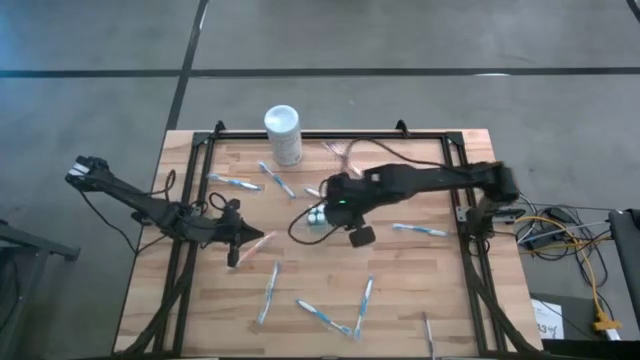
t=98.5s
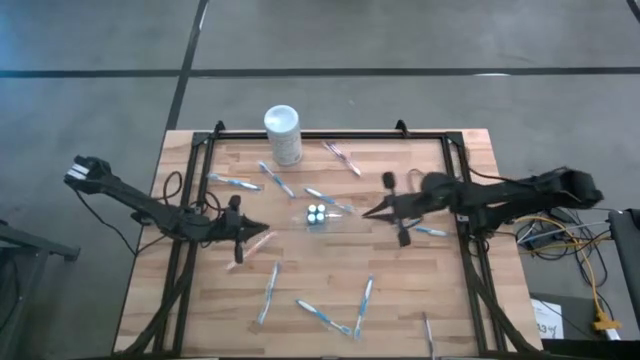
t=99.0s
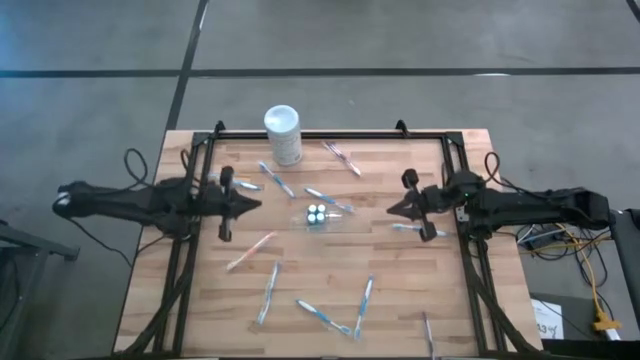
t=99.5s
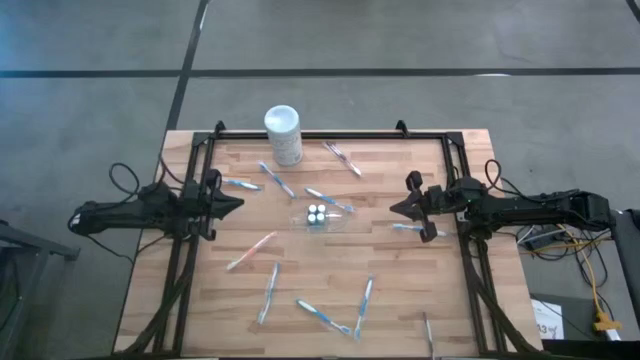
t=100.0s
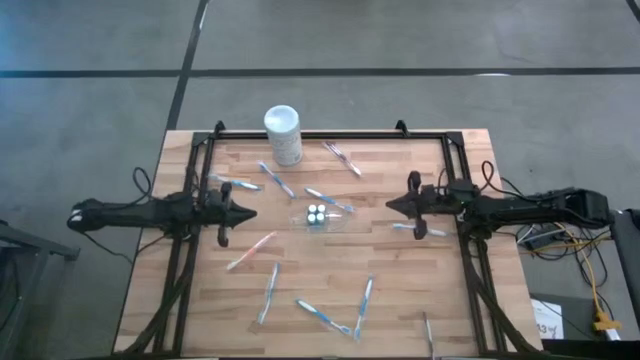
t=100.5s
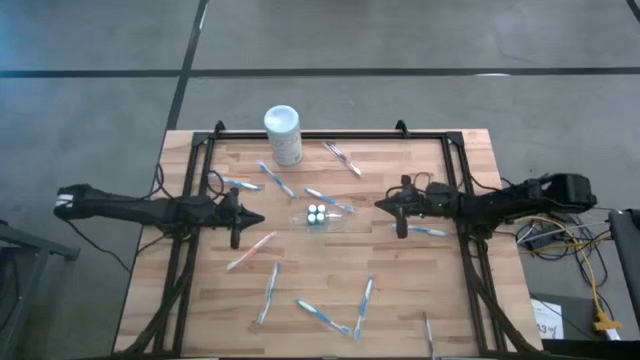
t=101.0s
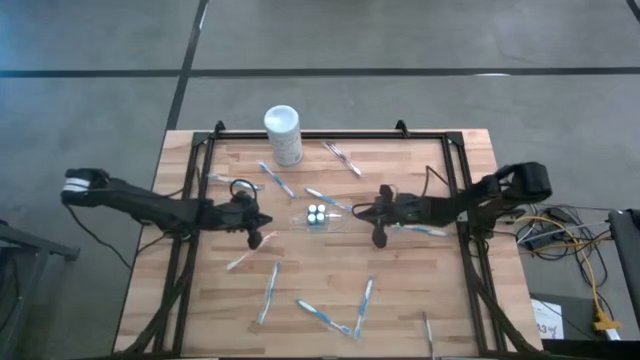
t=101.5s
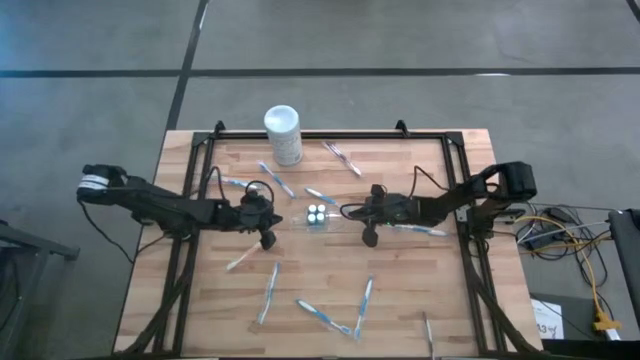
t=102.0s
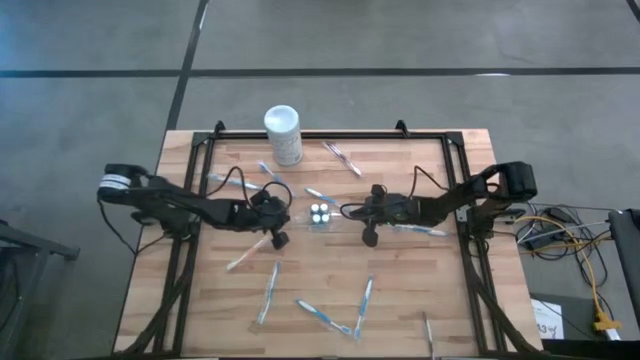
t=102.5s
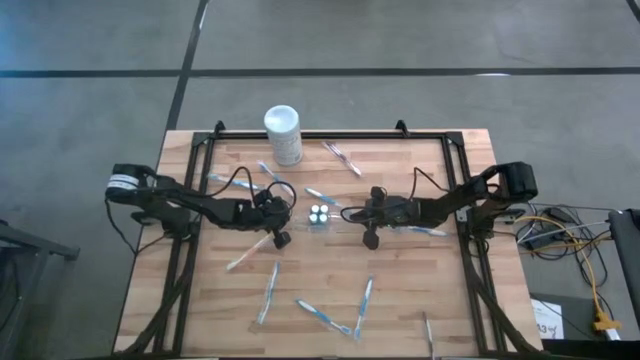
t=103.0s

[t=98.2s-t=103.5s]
Task: Pick & Place toothbrushing station
Adjust the transparent organizer

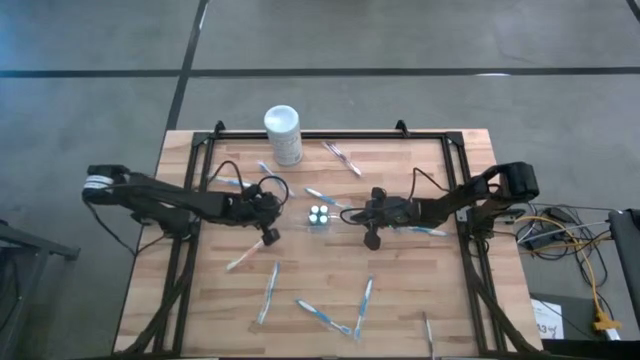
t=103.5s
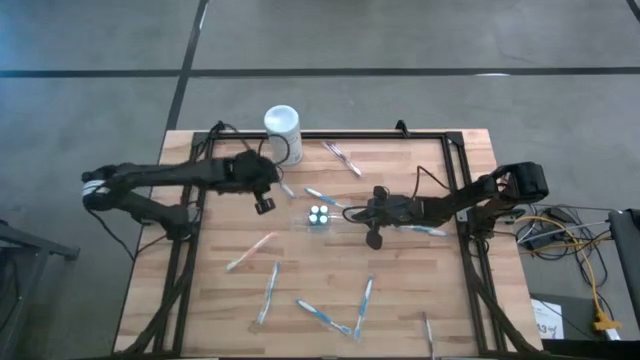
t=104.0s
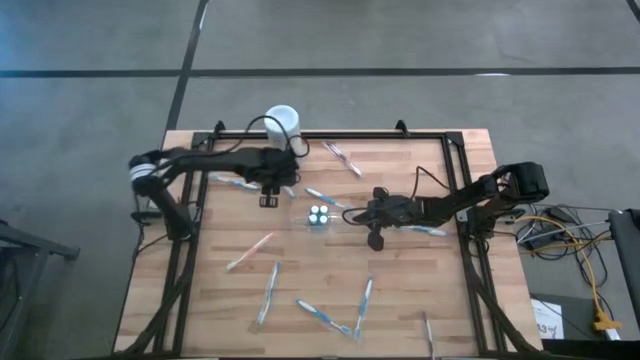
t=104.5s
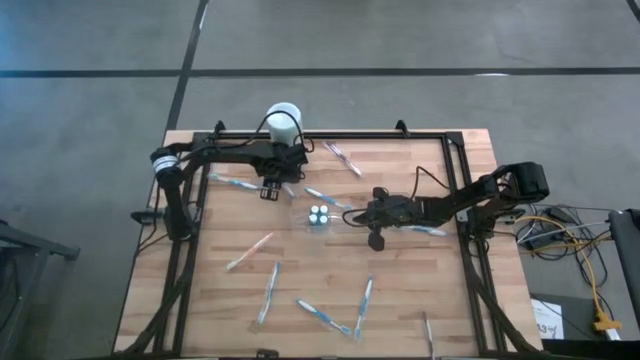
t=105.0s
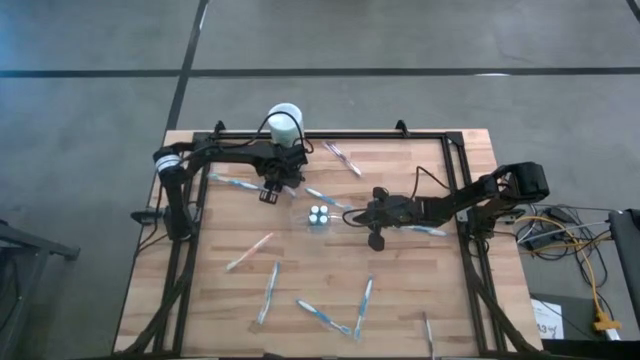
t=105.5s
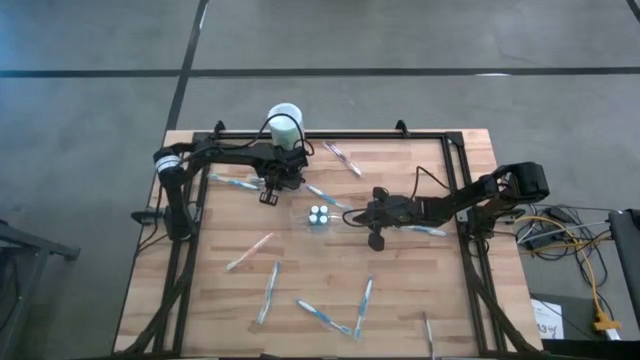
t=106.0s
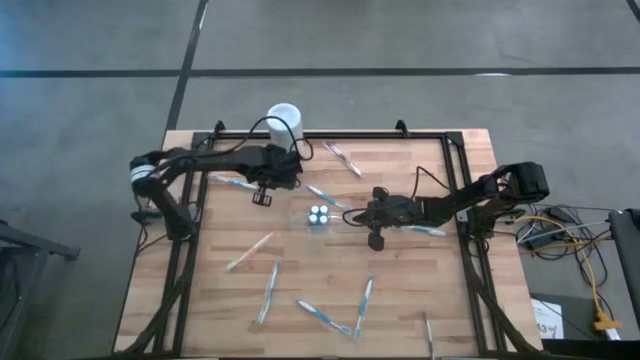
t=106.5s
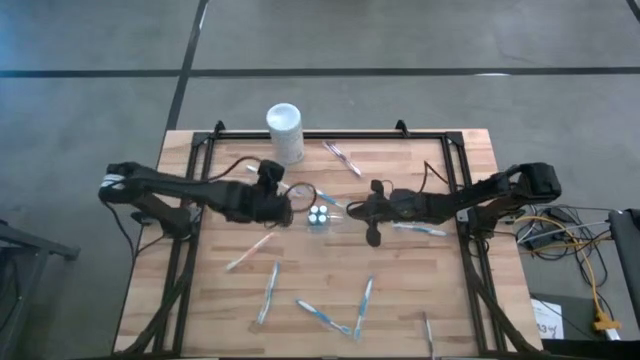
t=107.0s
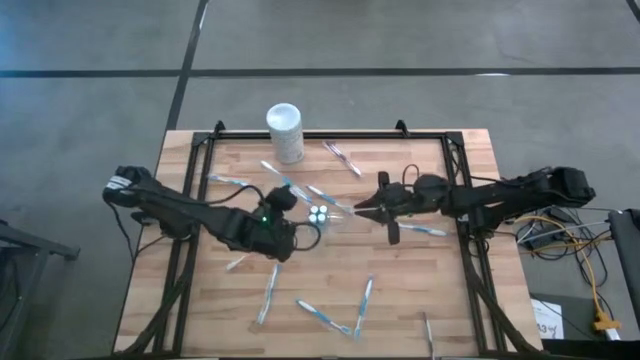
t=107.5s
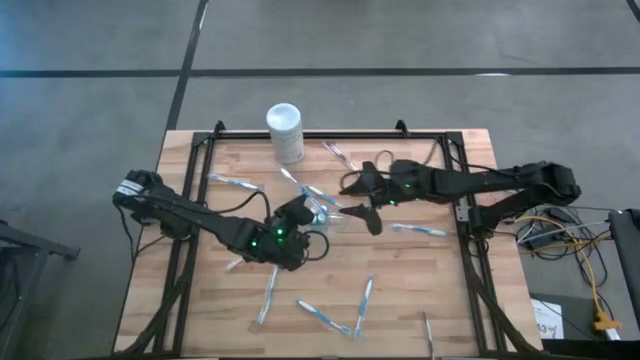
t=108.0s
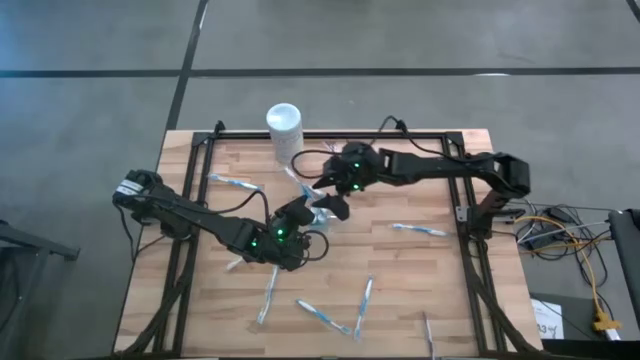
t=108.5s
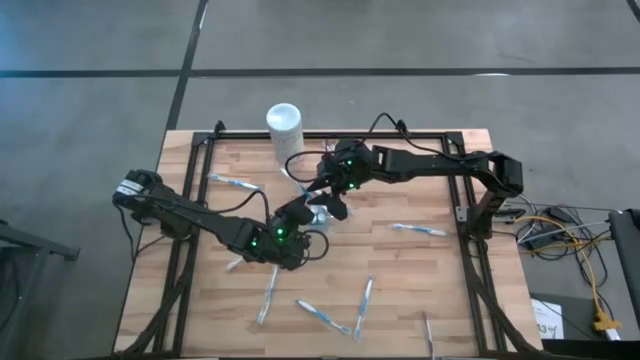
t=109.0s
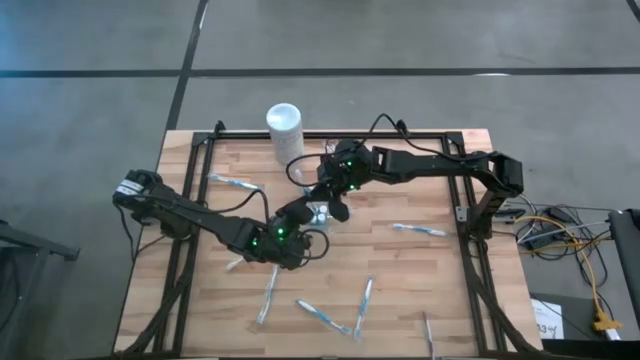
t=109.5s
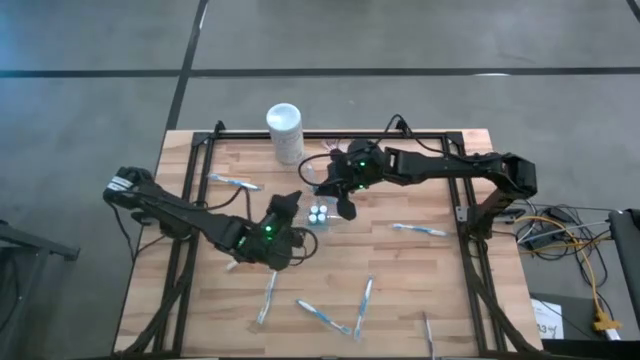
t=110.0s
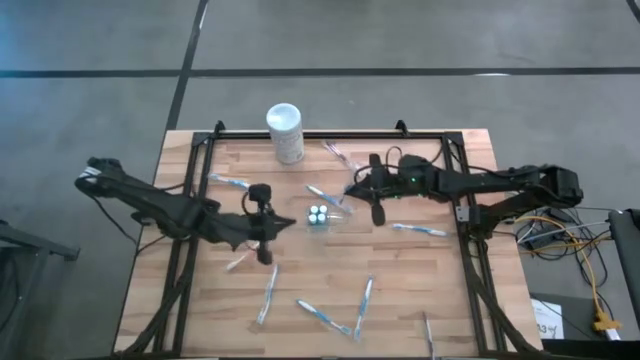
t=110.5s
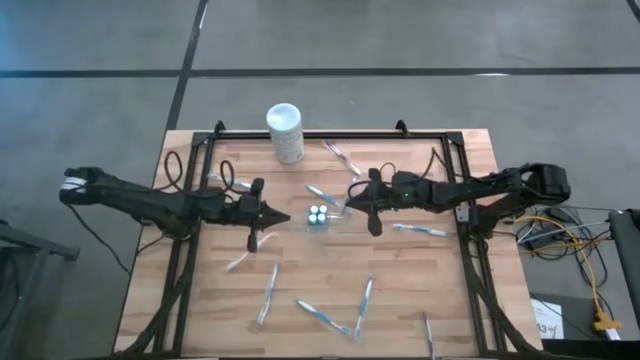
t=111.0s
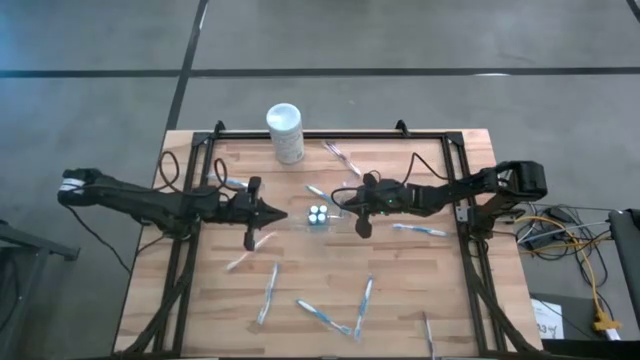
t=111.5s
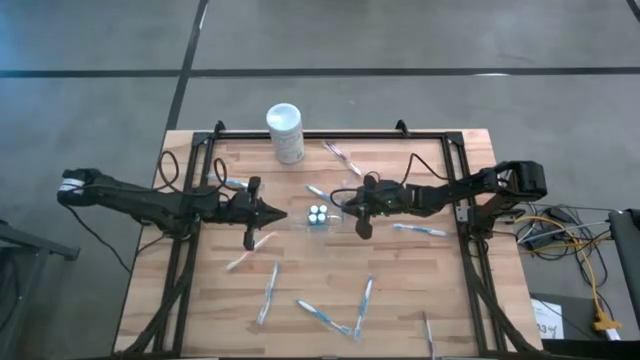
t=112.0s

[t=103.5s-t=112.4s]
Put the blue toothbrush into the transparent organizer

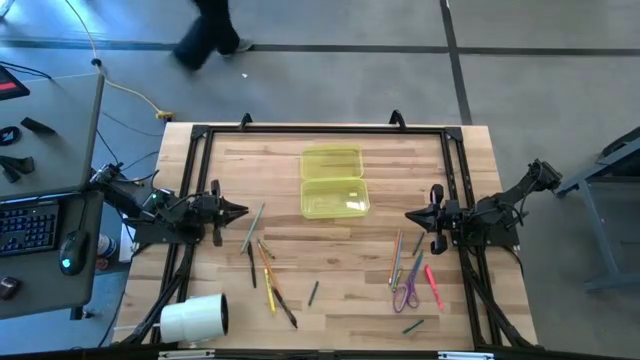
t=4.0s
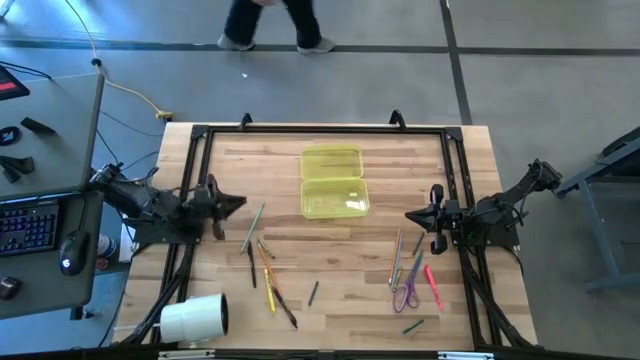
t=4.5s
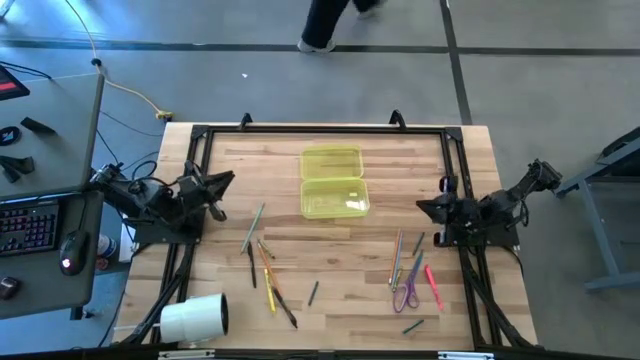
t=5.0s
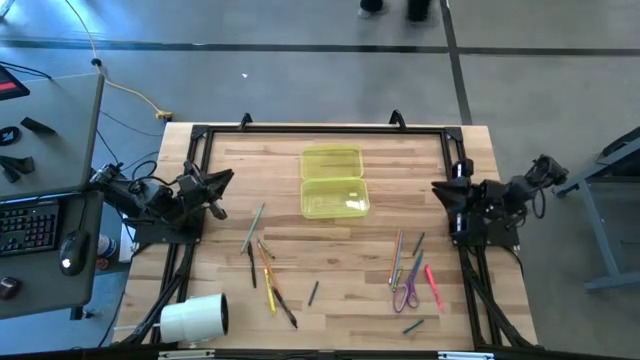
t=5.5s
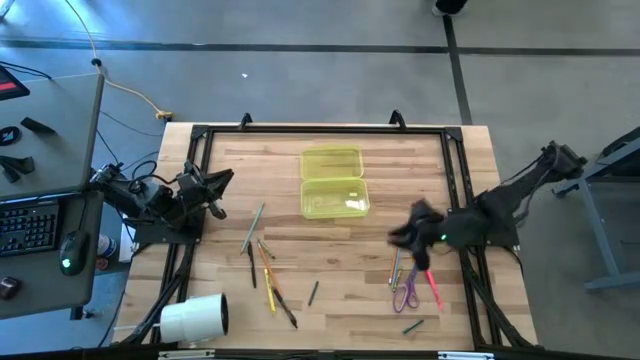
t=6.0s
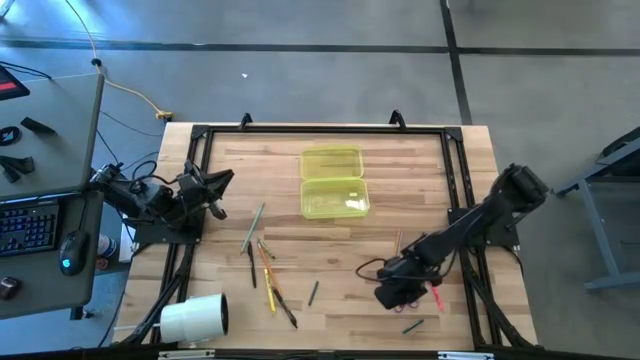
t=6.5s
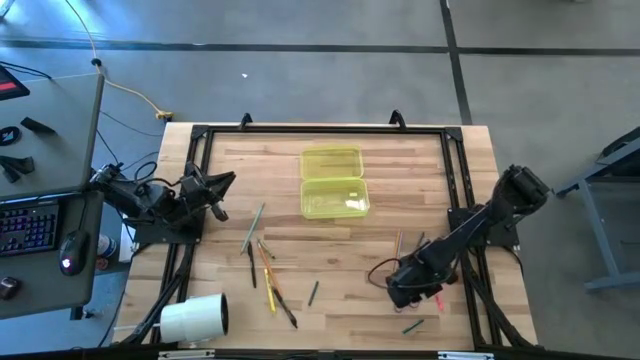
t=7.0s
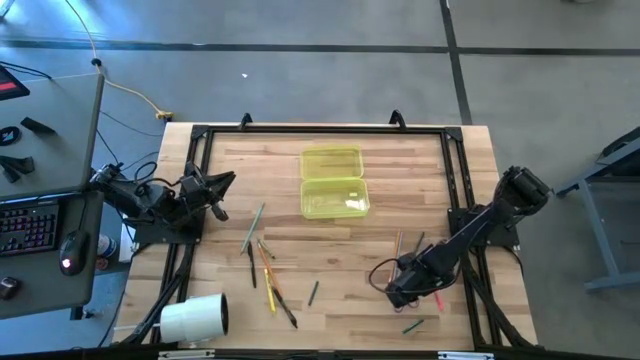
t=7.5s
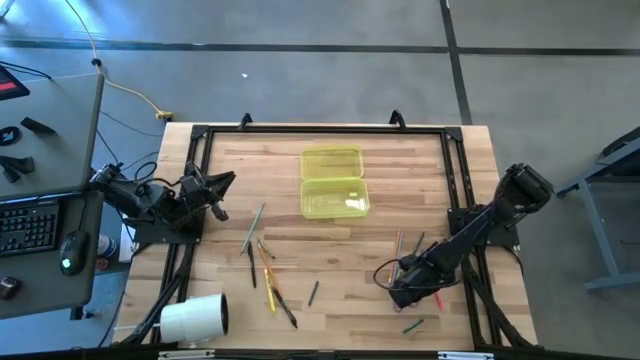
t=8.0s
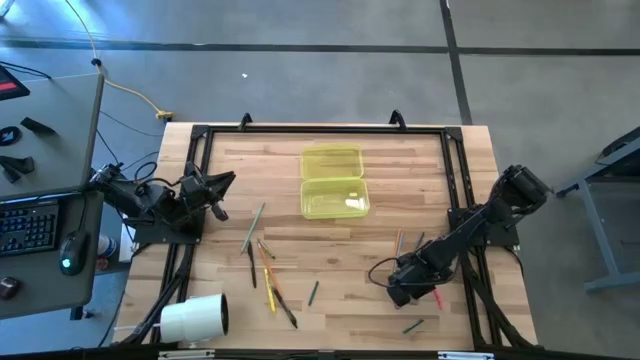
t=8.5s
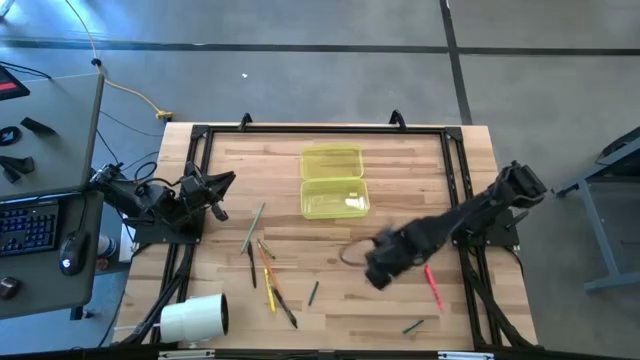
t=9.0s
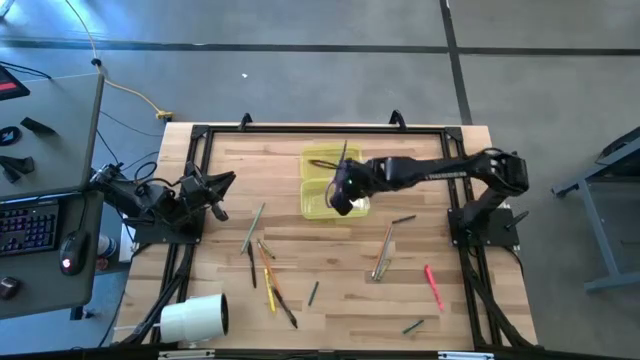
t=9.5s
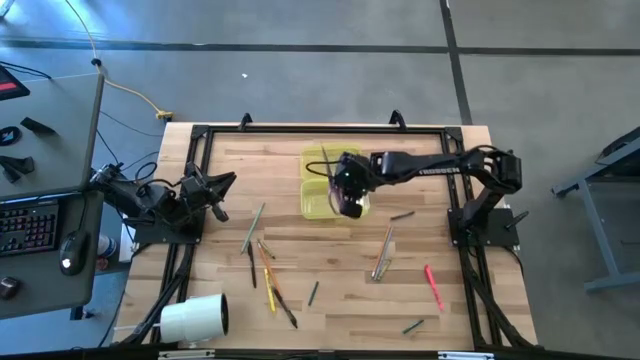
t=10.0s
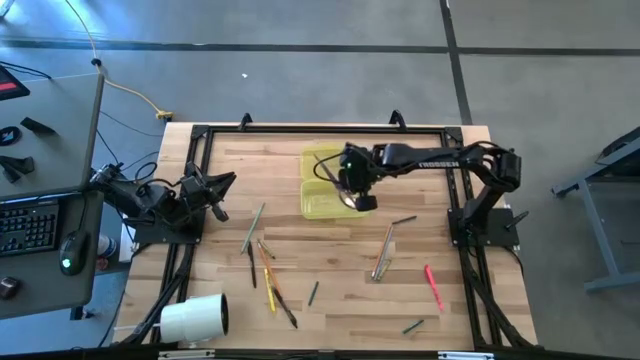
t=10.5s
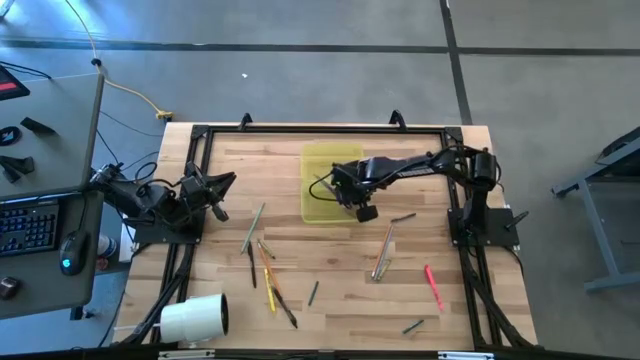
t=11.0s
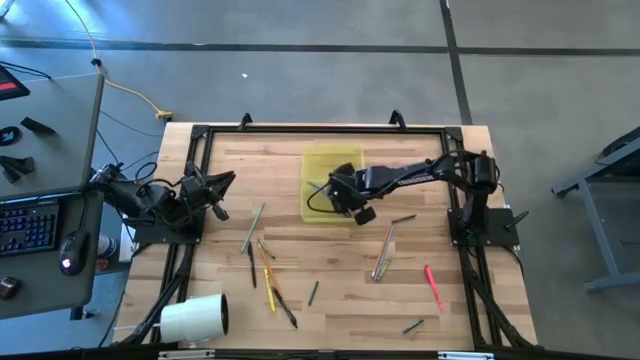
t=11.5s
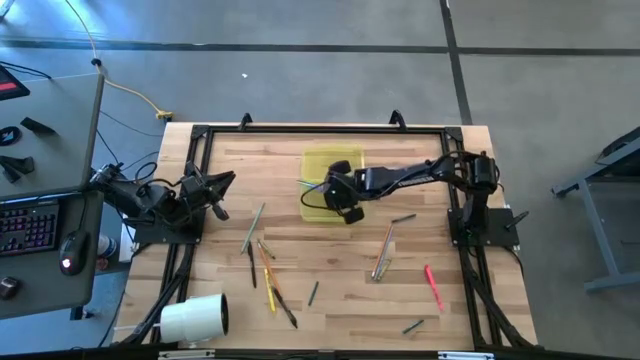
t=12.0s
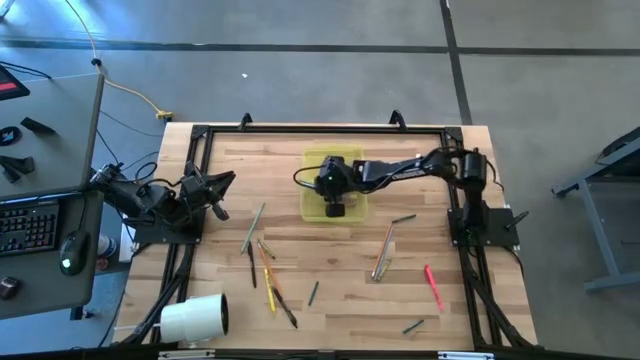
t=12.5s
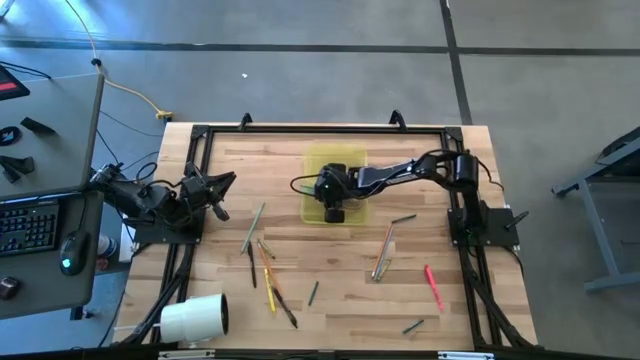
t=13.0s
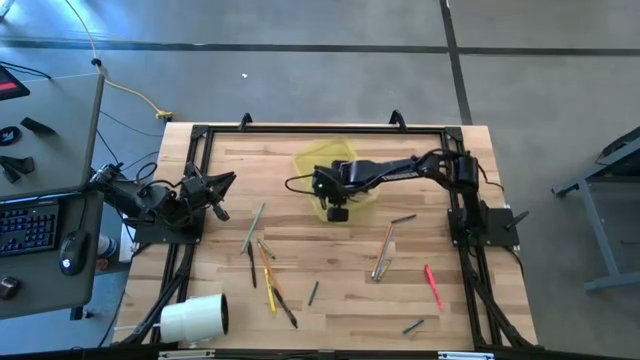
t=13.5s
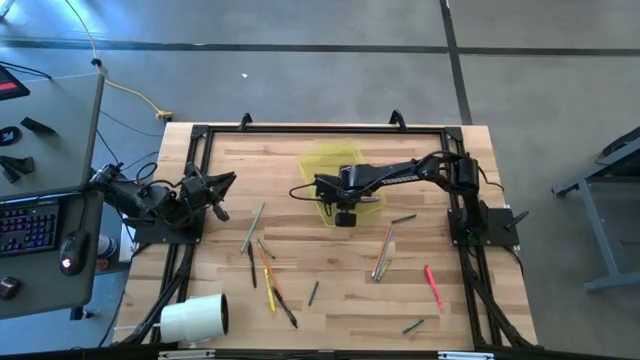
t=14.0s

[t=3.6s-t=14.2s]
Task: Pick & place school supplies into a supply box
Put the scissors into the supply box
